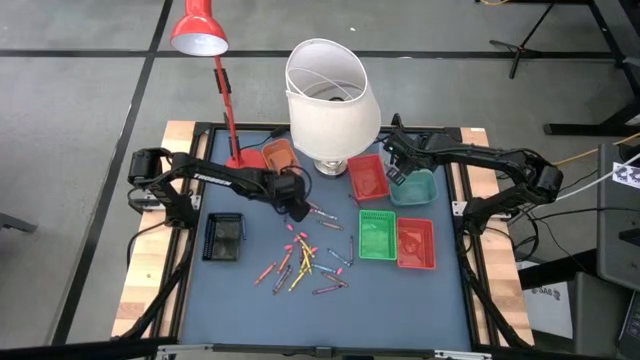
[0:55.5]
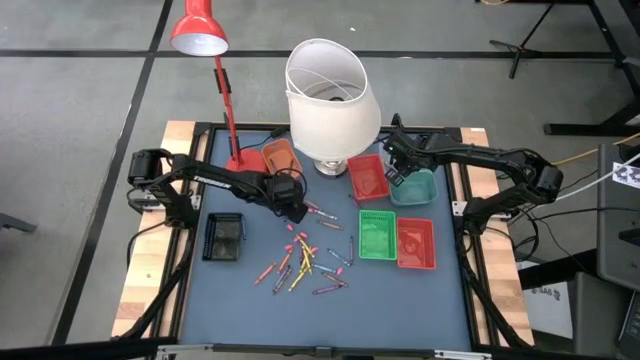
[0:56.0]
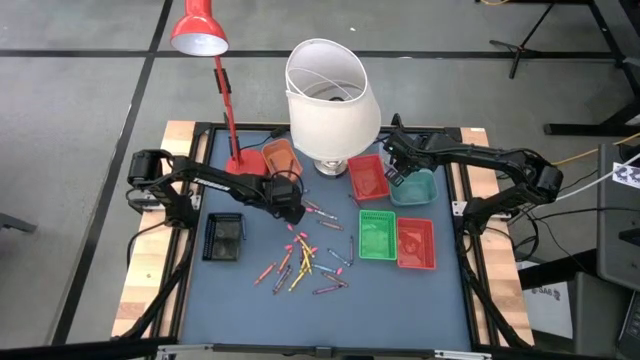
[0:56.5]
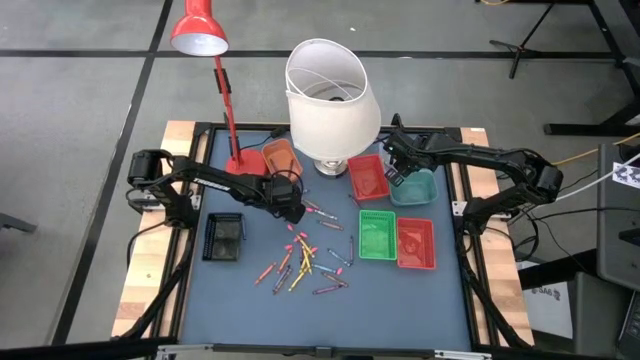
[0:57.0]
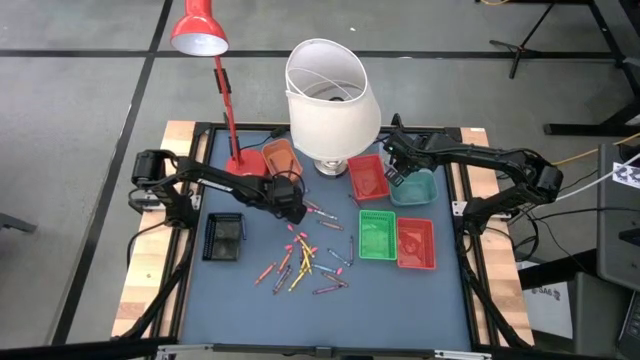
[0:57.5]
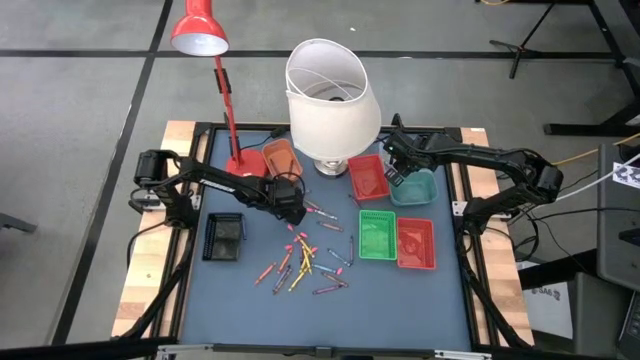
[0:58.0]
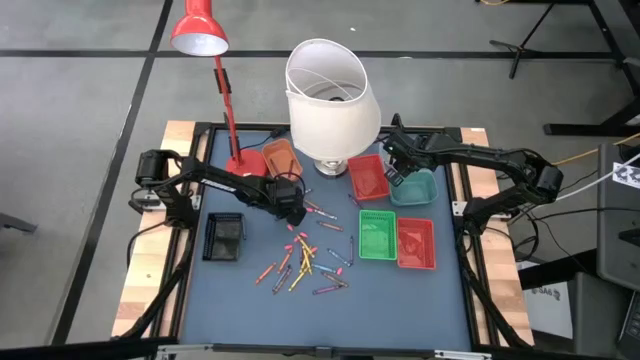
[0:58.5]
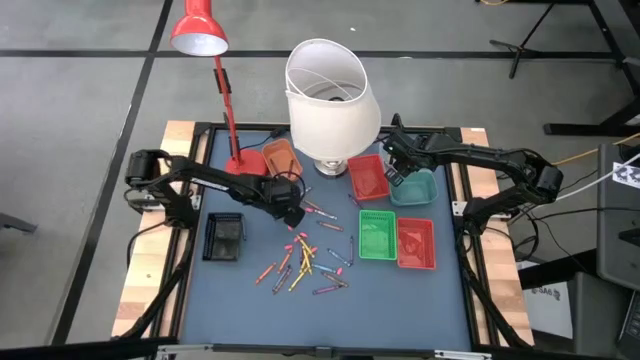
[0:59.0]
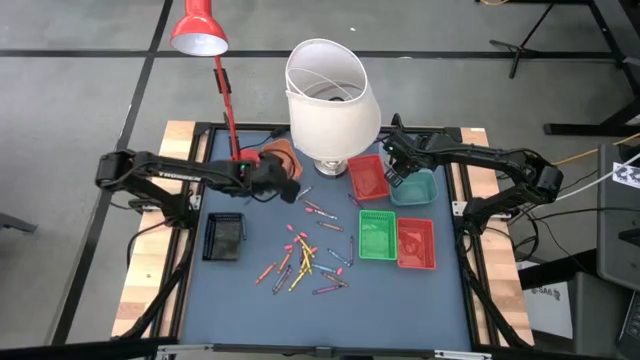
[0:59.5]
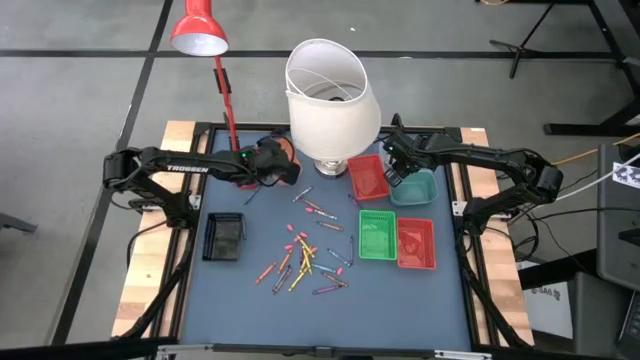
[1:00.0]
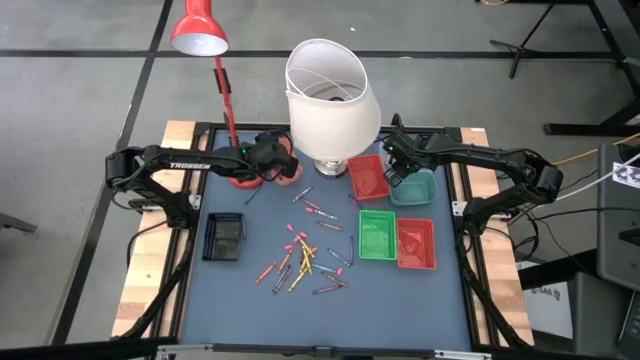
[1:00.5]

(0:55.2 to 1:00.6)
Task: Sort crayons
Put the violet crayon into the orange bin

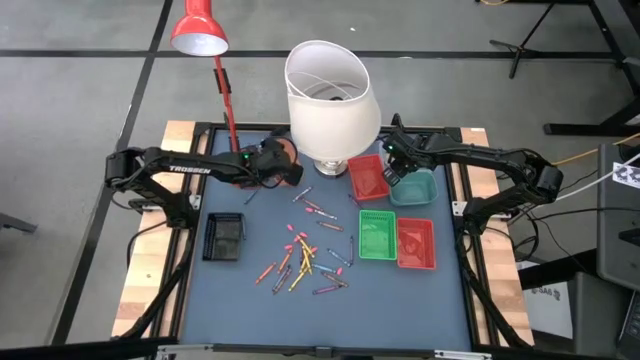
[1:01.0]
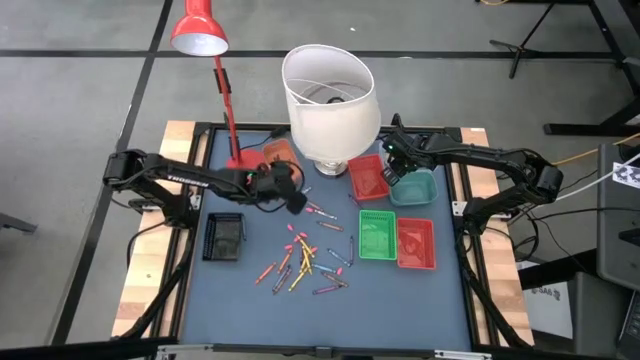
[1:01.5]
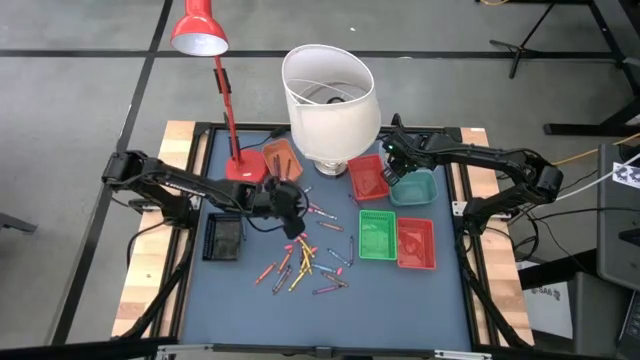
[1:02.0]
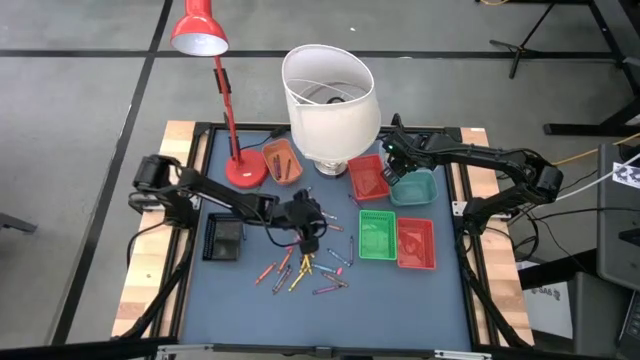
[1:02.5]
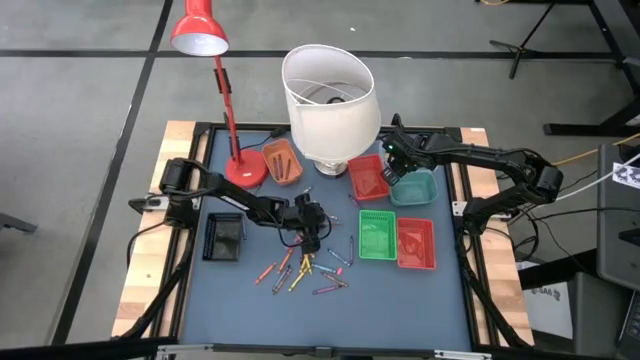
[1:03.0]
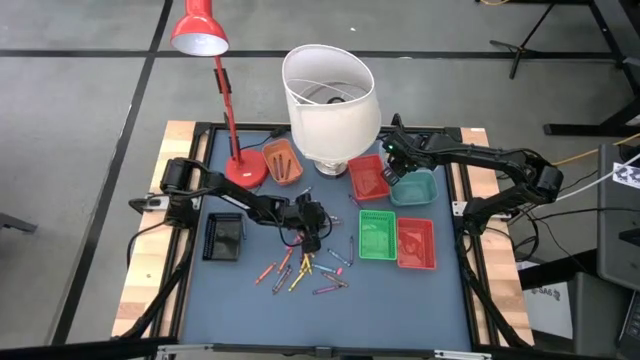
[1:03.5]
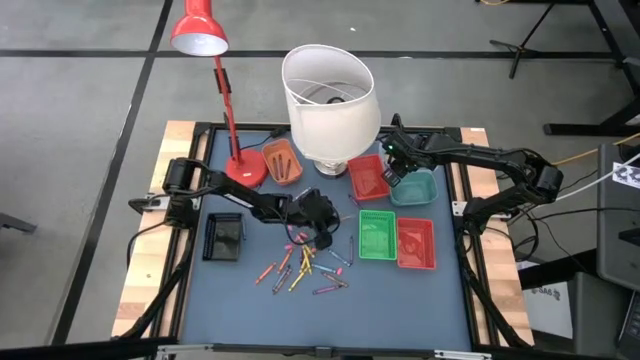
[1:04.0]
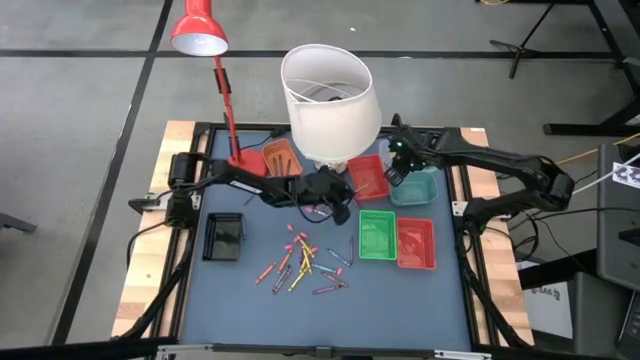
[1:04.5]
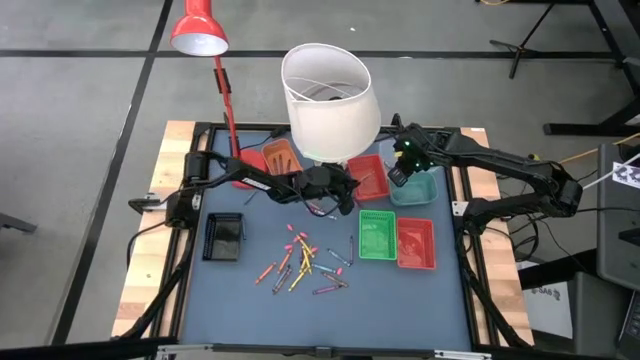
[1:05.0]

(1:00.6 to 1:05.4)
Put the brown crayon into the top dark orange bin

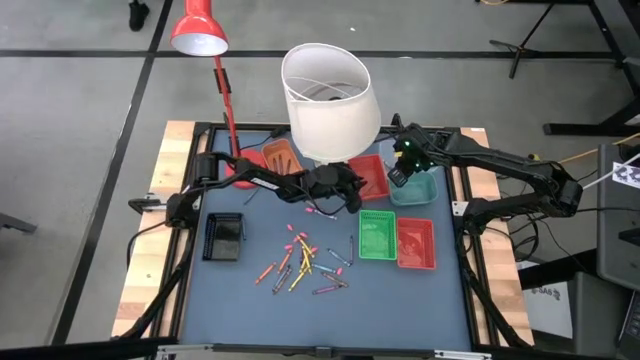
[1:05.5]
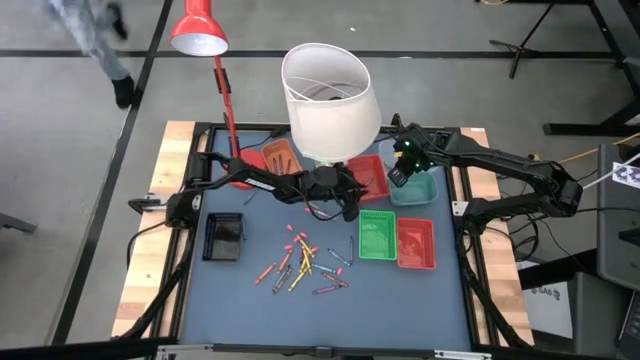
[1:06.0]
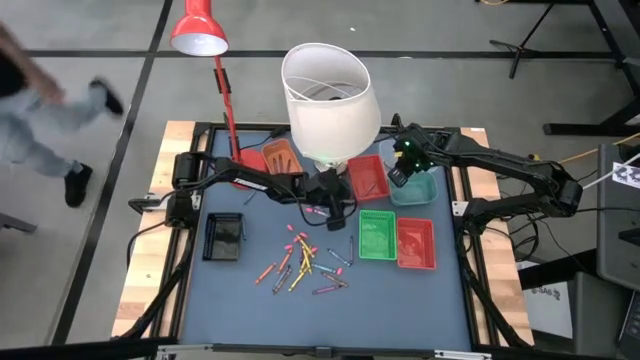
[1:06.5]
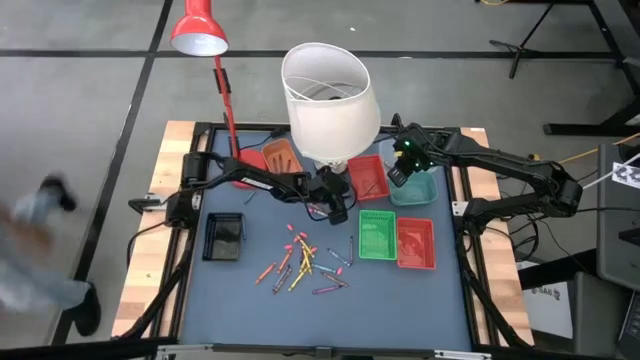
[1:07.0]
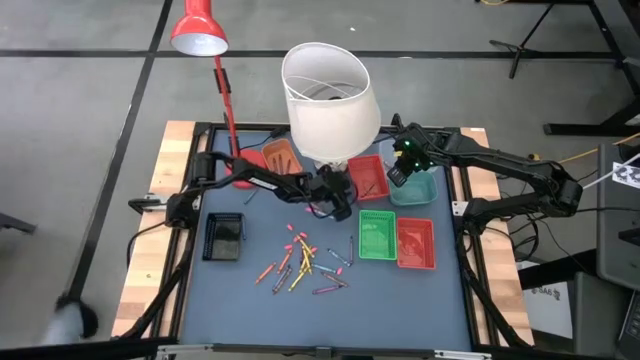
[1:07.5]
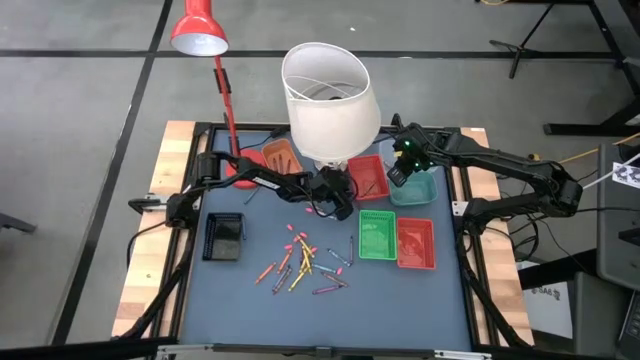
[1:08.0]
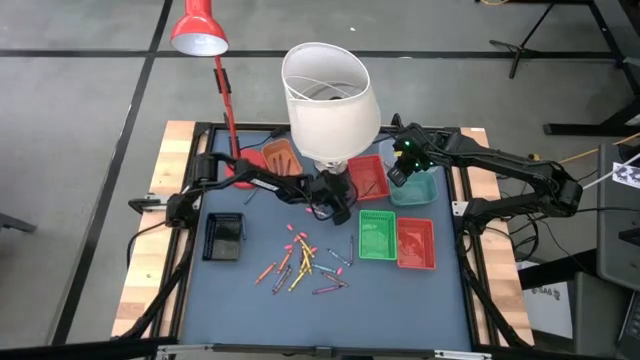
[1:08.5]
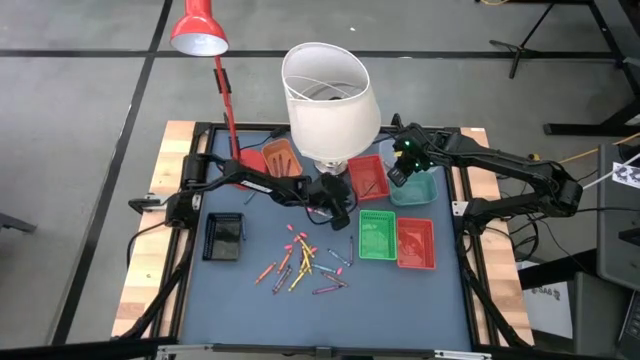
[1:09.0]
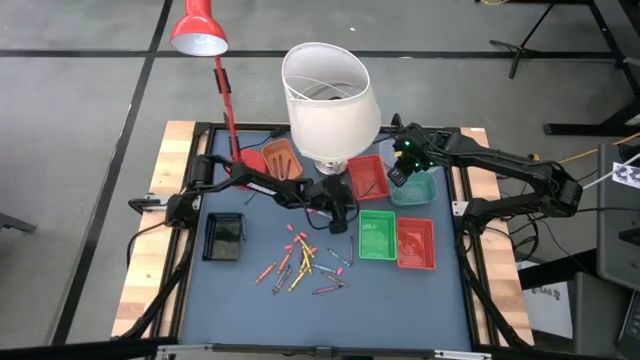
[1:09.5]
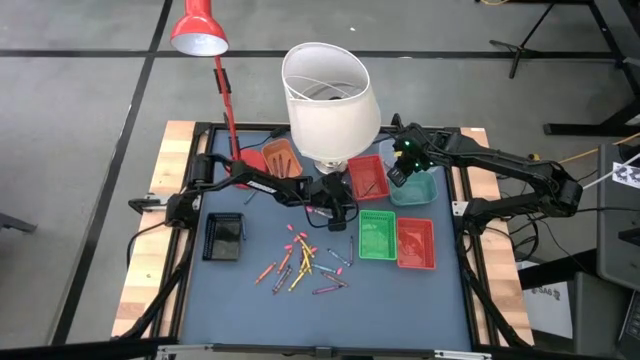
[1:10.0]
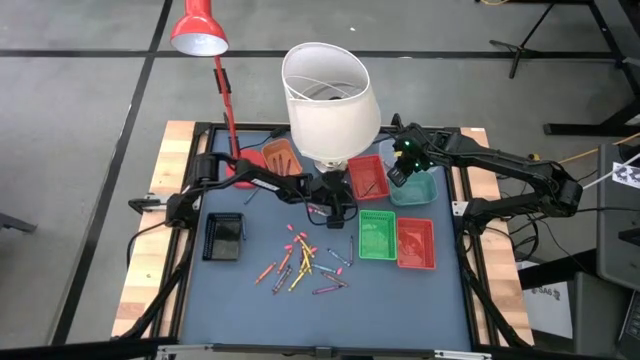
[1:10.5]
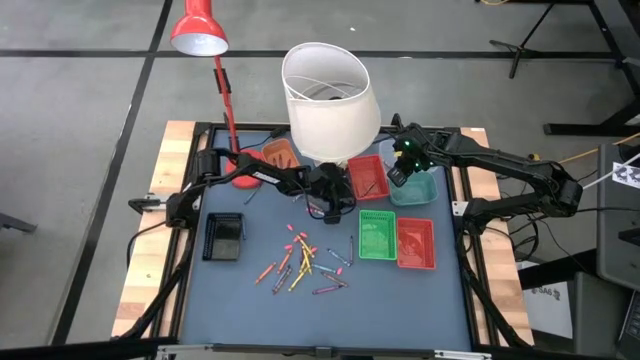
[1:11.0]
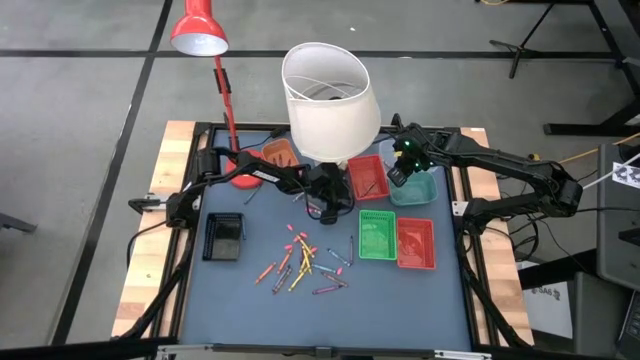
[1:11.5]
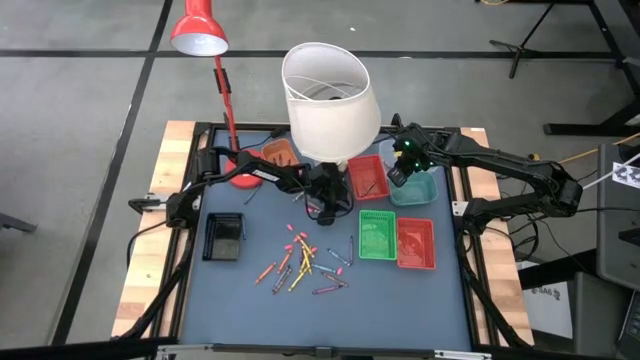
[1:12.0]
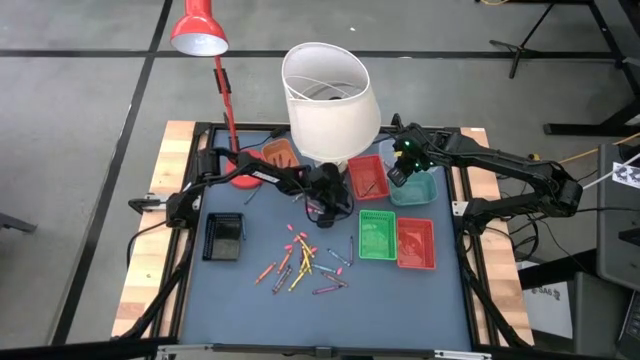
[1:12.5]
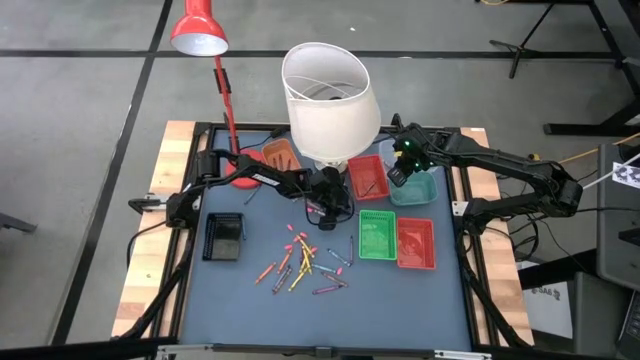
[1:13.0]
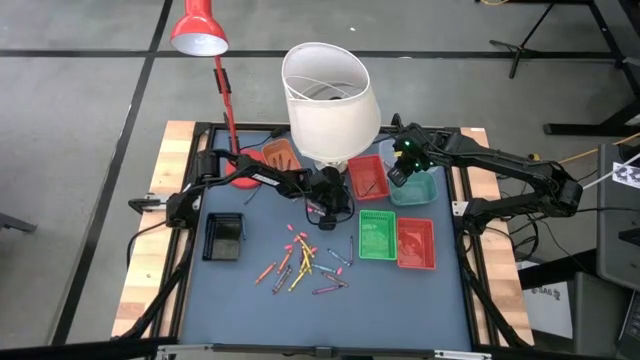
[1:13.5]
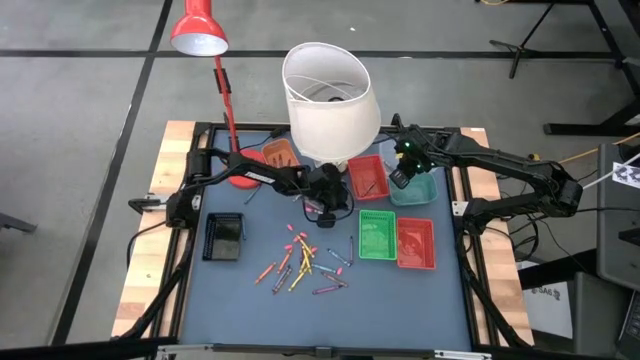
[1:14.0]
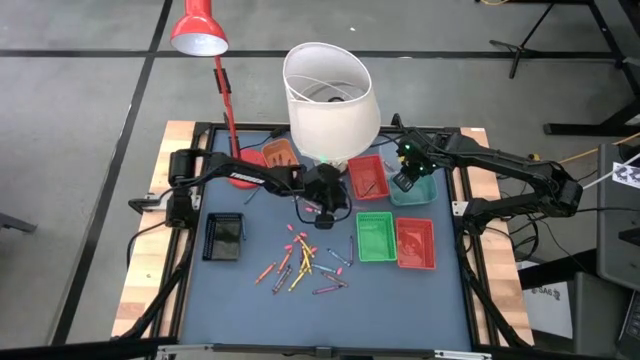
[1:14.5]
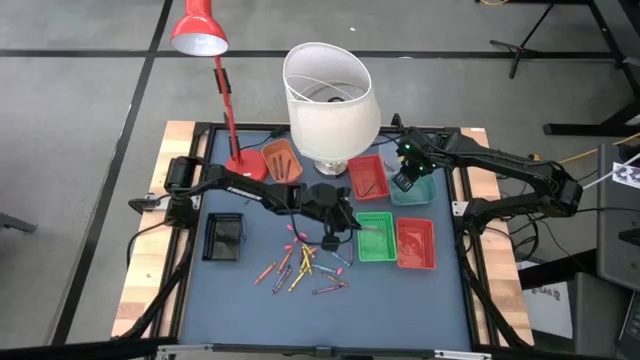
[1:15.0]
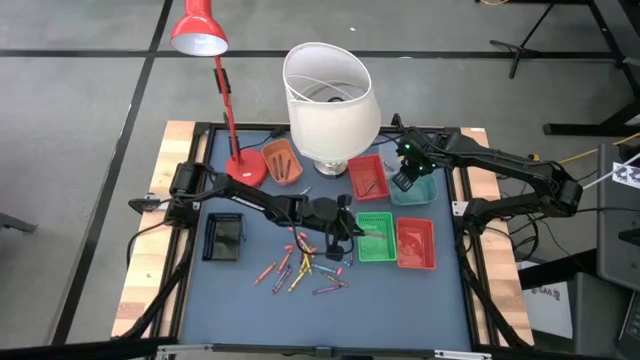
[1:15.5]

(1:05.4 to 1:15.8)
Put the violet crayon into the green bin

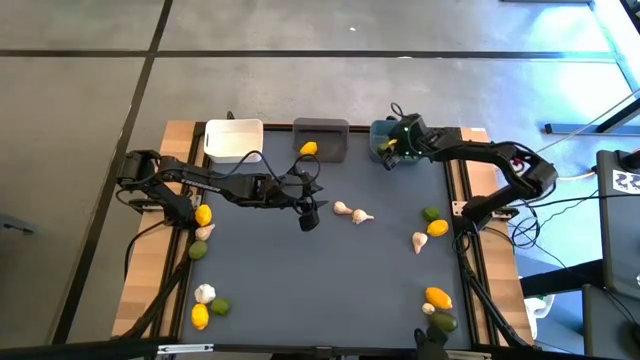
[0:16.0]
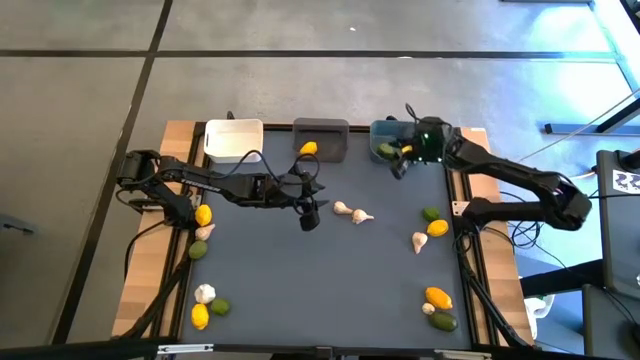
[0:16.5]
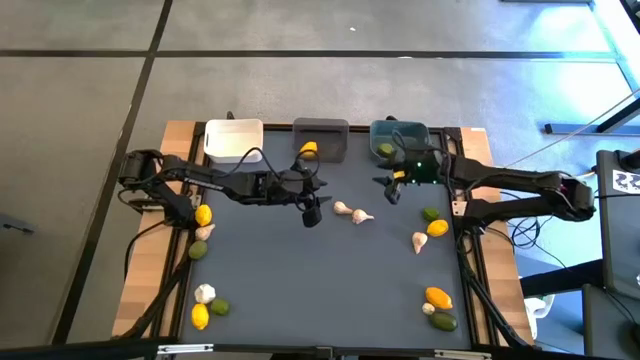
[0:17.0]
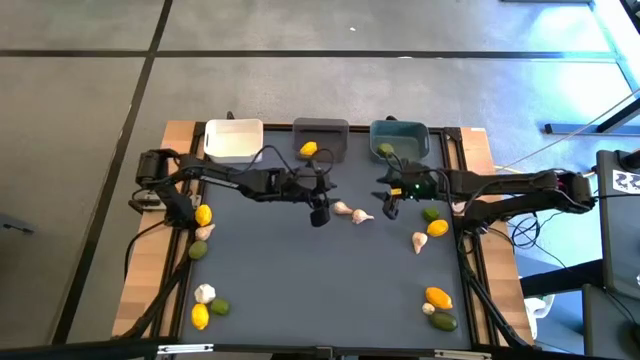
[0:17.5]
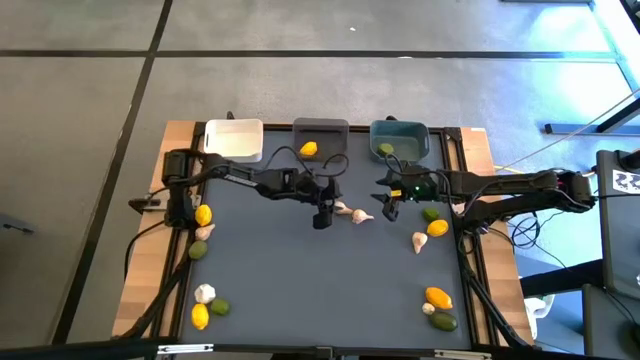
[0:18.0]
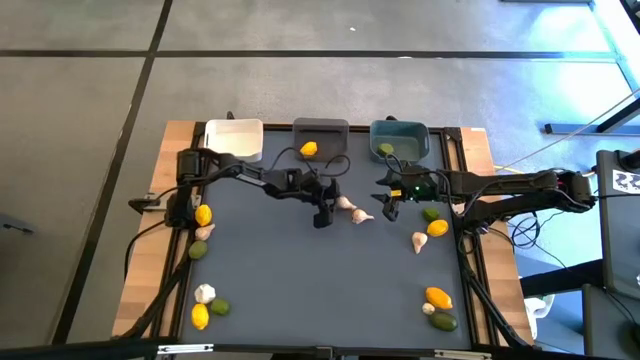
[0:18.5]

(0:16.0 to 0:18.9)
Task: Sort produce into baskets
Put the garlic into the white bin
